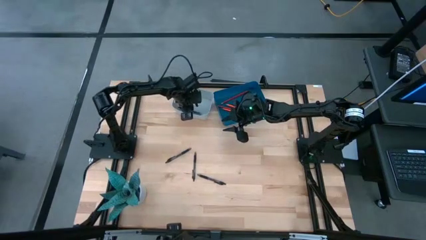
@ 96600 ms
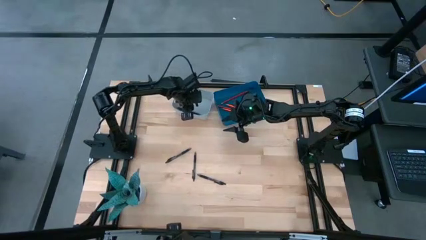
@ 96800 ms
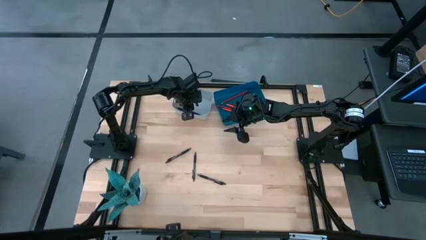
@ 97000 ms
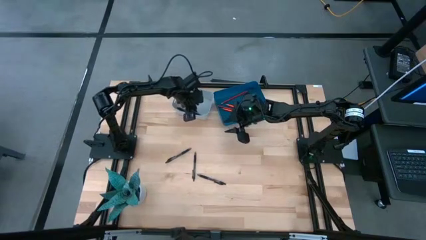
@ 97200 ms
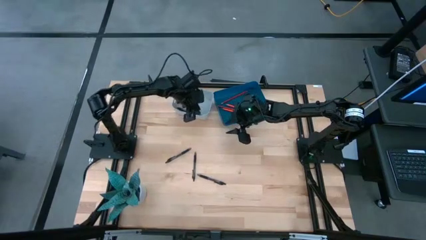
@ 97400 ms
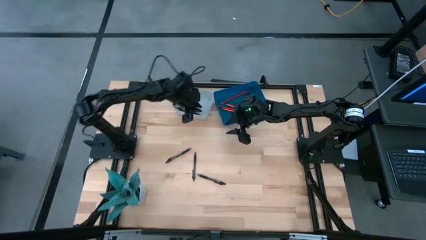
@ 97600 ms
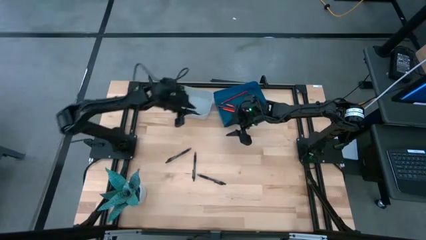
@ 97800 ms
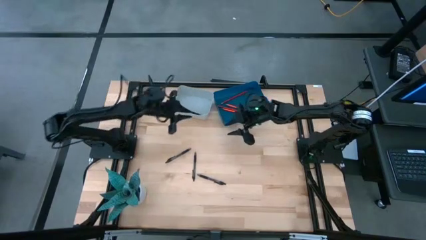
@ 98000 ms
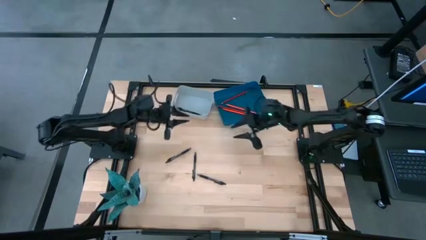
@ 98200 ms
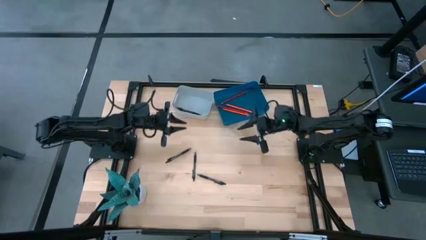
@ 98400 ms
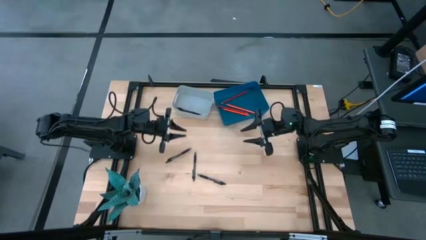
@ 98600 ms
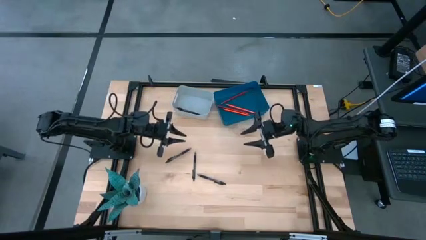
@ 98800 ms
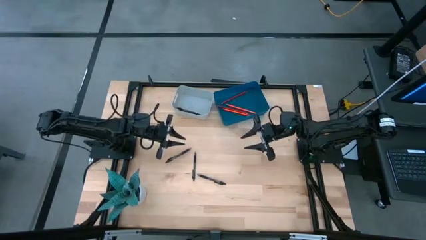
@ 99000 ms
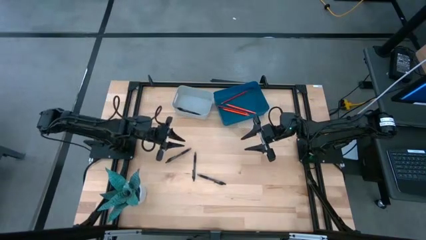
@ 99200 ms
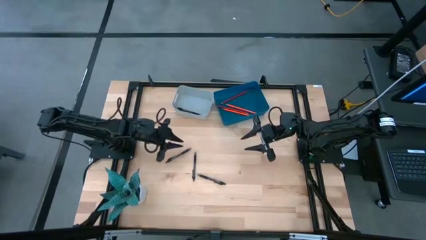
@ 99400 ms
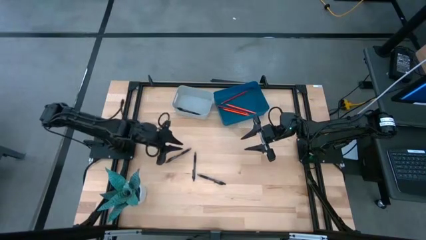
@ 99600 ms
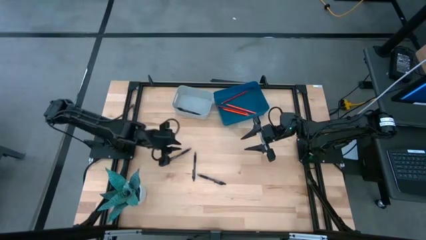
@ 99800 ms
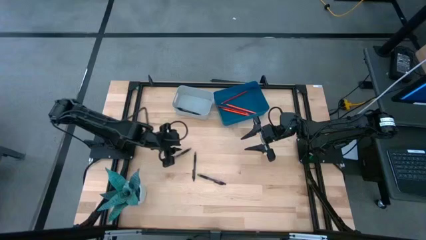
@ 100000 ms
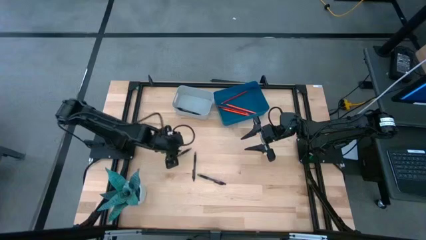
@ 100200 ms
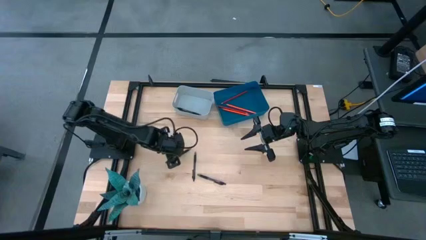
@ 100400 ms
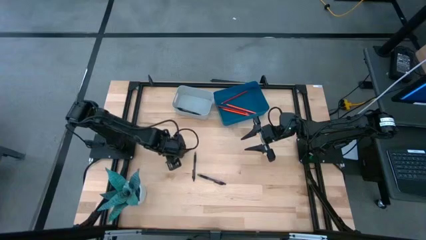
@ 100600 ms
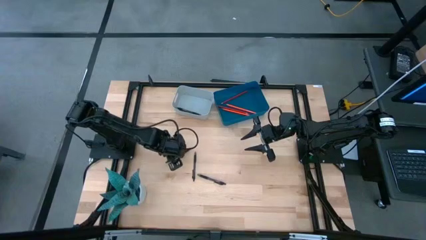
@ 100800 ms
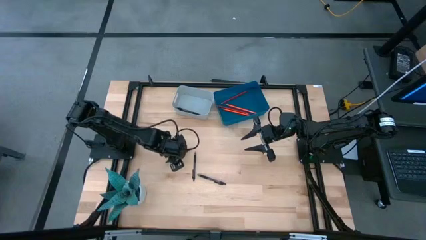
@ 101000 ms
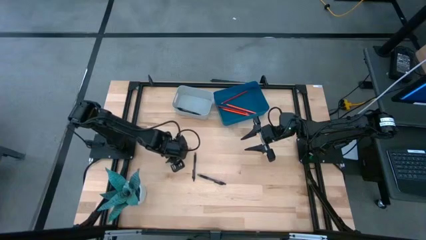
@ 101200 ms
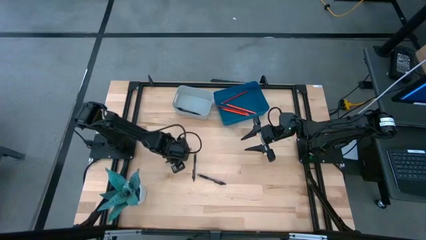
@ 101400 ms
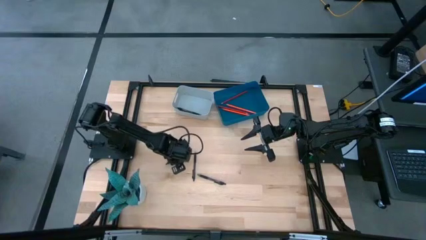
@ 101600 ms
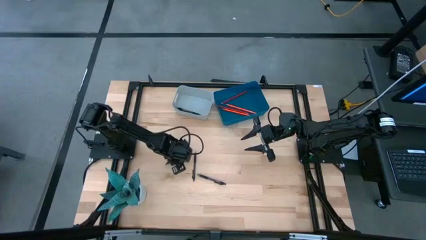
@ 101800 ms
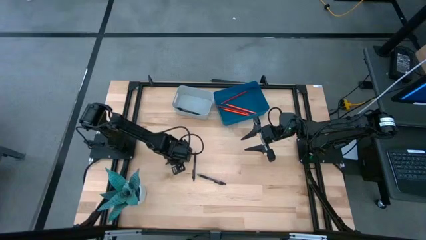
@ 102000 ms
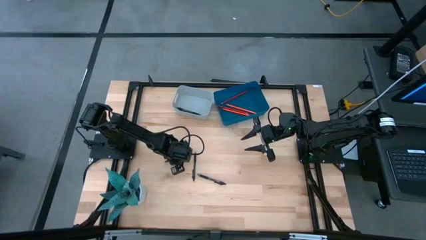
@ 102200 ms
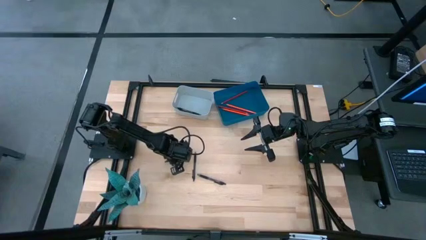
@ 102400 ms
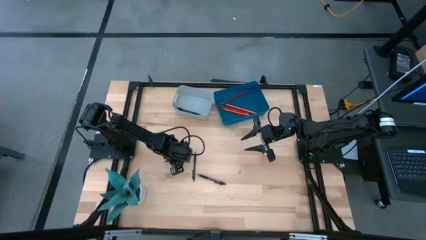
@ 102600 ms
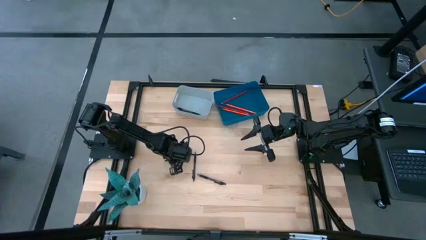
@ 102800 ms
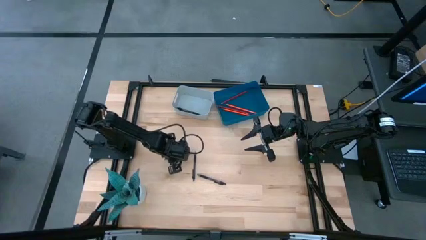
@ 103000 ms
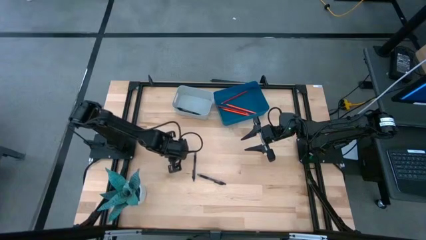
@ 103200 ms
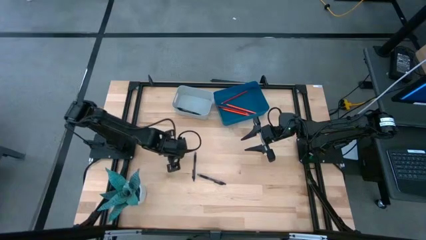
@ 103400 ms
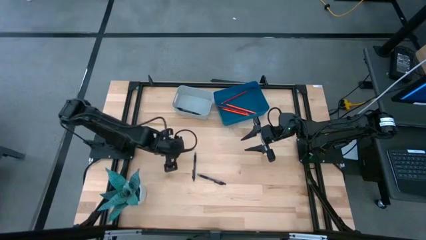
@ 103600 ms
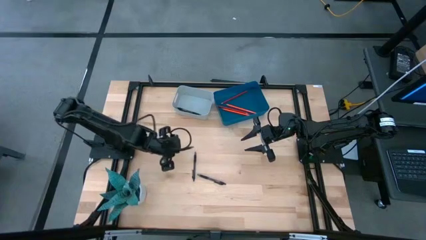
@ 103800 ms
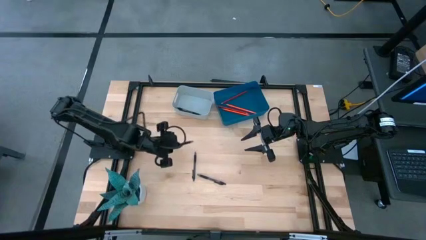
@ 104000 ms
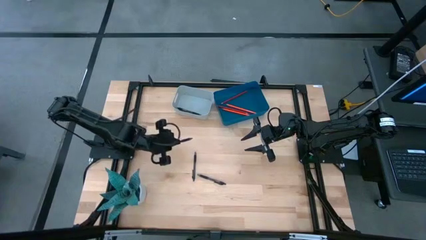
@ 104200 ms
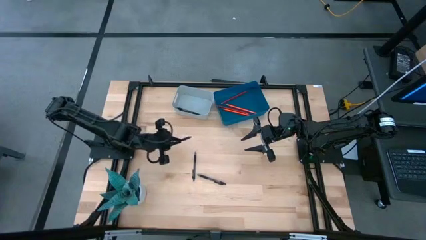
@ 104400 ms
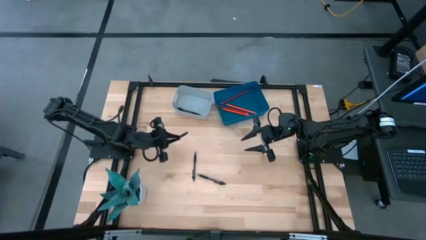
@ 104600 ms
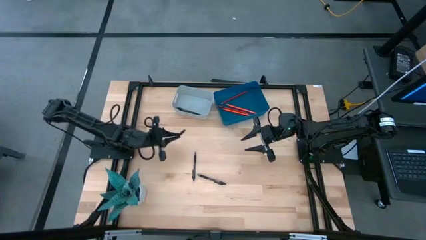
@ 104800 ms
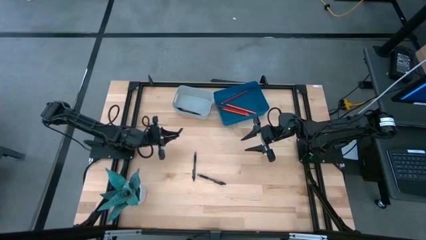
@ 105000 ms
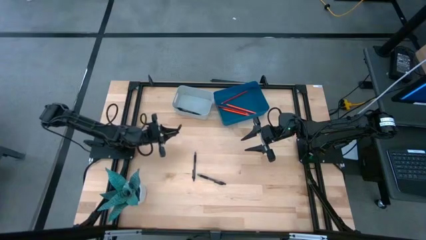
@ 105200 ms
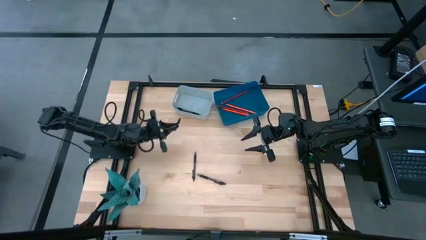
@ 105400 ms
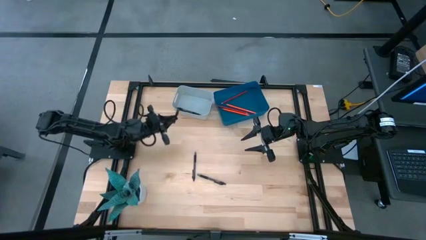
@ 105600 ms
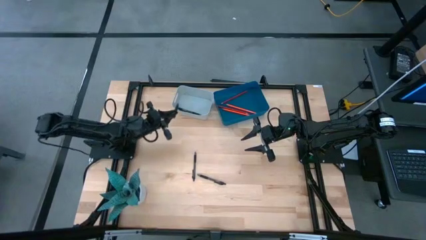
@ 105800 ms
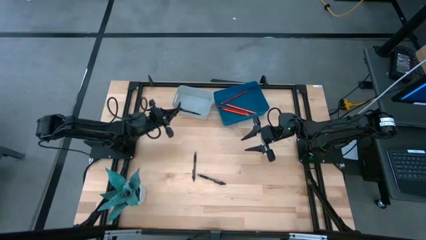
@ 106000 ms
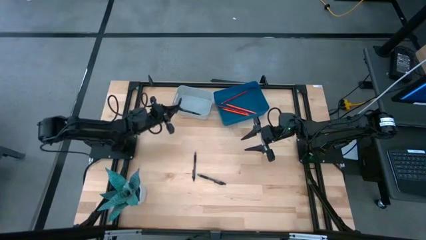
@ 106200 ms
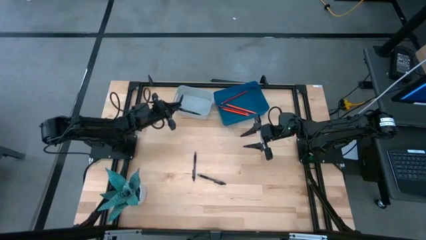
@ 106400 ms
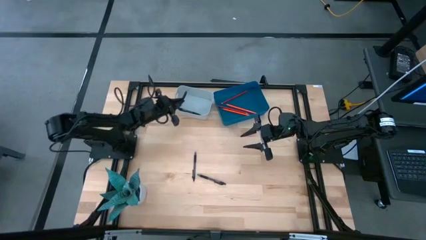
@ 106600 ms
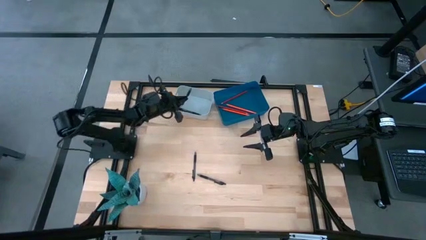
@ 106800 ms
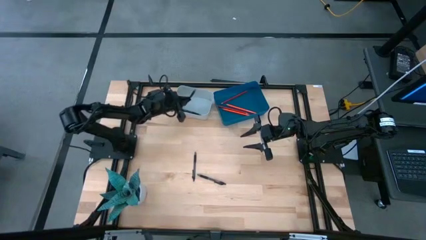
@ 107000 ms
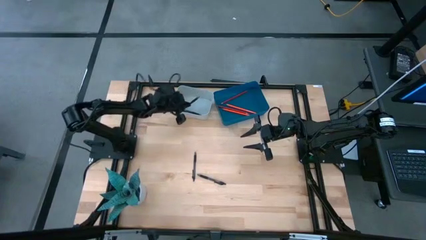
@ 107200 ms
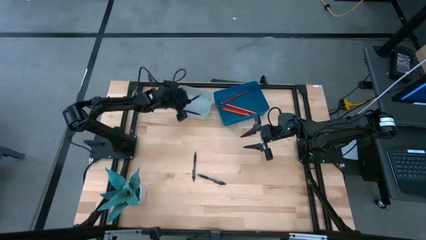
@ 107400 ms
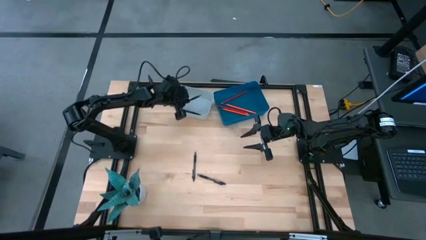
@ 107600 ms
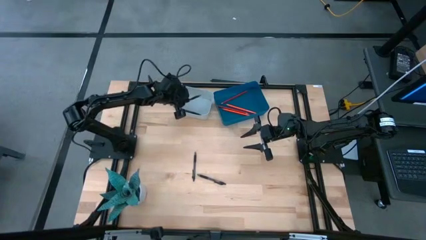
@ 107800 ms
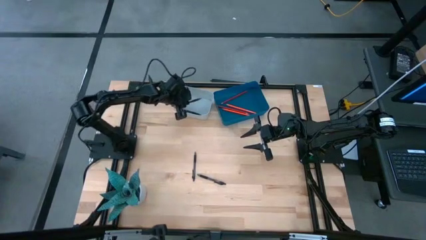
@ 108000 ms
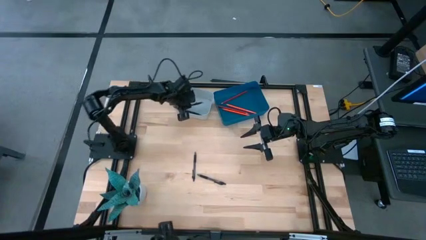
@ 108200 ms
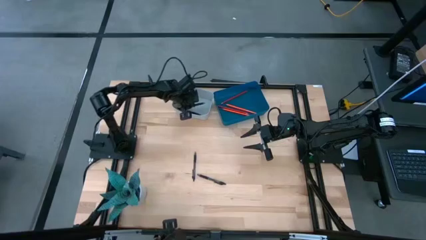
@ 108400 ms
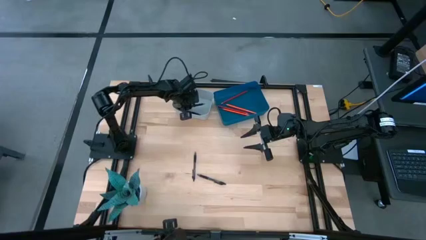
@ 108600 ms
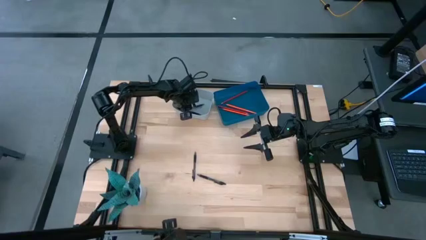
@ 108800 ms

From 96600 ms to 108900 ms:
Task: Sort pens & pencils
Put the black pen into the gray bin

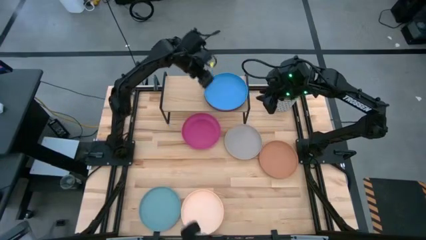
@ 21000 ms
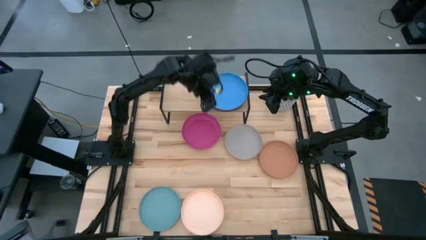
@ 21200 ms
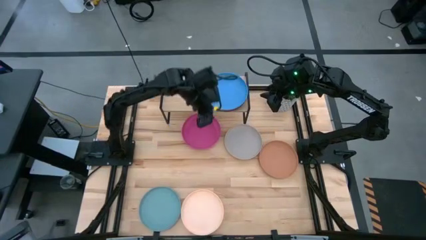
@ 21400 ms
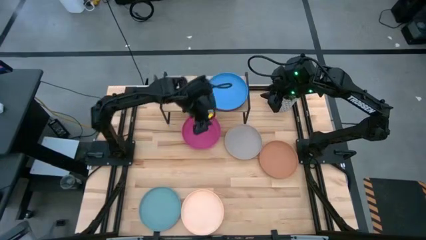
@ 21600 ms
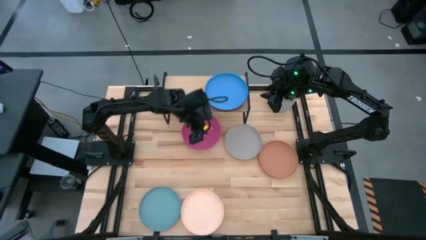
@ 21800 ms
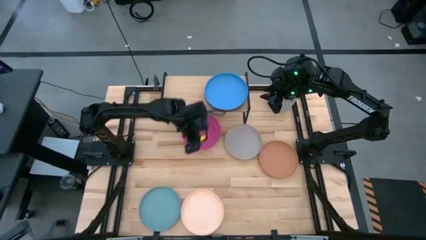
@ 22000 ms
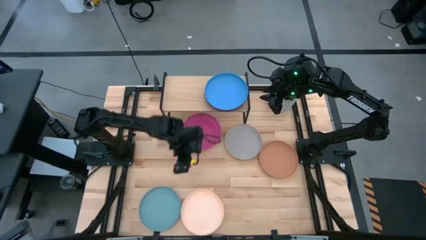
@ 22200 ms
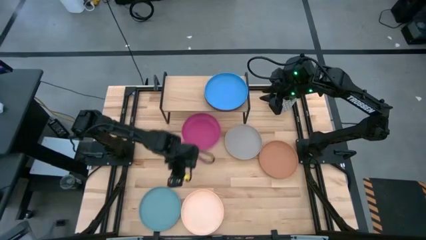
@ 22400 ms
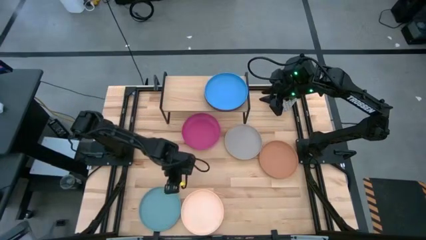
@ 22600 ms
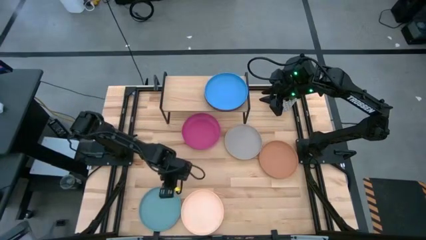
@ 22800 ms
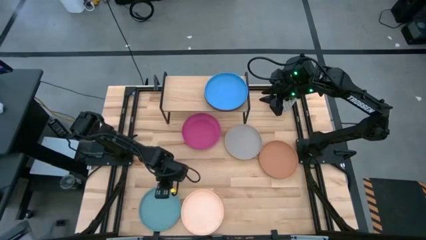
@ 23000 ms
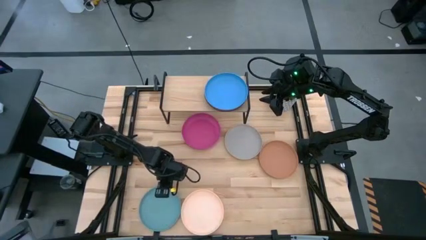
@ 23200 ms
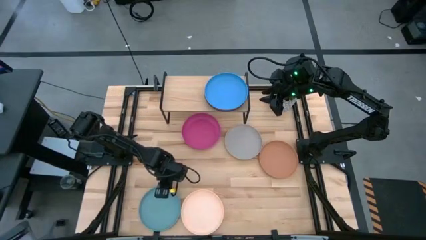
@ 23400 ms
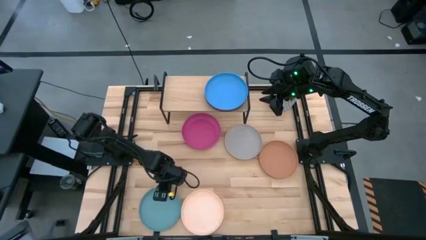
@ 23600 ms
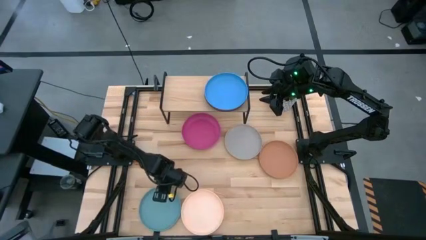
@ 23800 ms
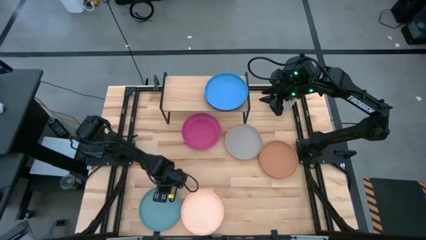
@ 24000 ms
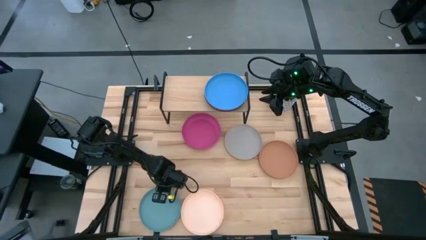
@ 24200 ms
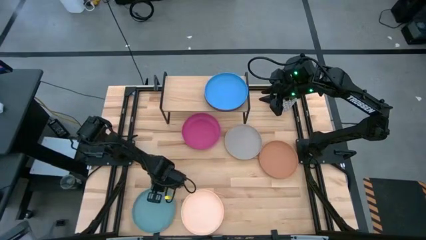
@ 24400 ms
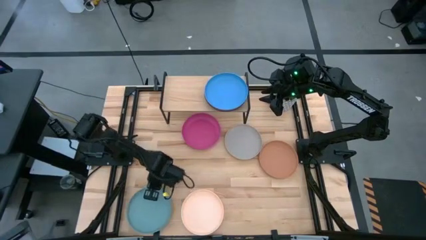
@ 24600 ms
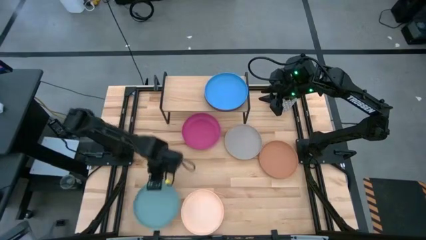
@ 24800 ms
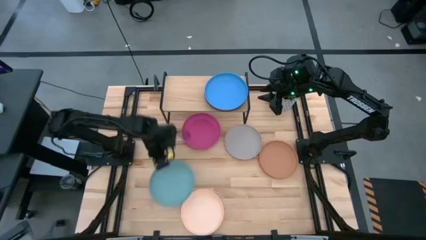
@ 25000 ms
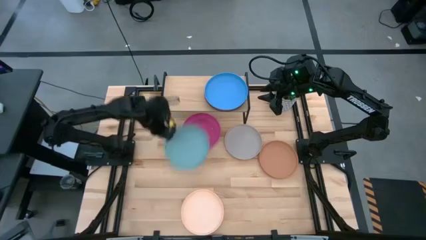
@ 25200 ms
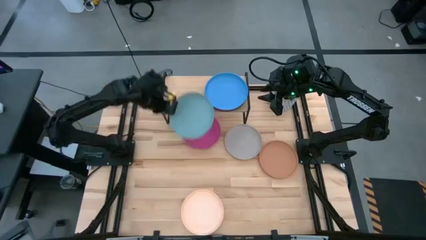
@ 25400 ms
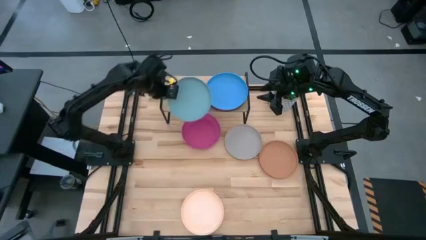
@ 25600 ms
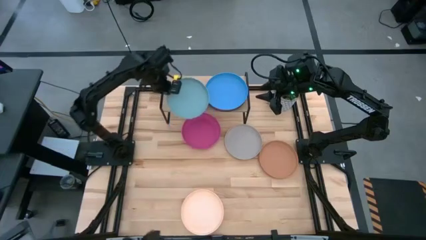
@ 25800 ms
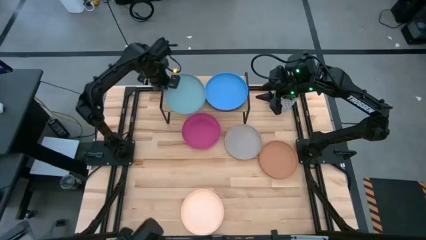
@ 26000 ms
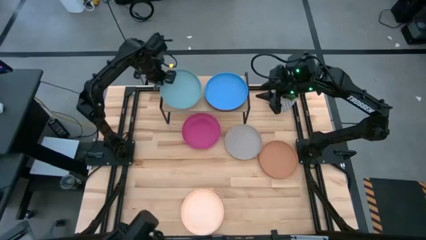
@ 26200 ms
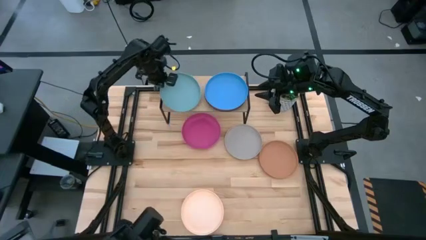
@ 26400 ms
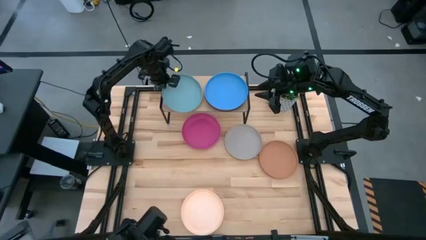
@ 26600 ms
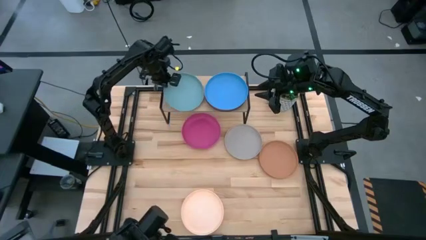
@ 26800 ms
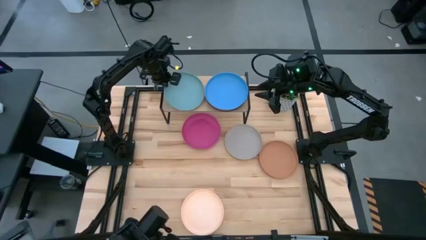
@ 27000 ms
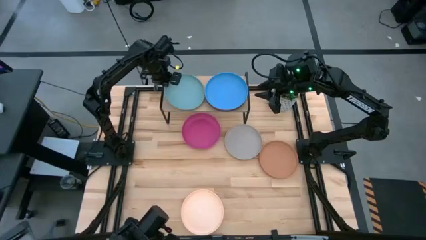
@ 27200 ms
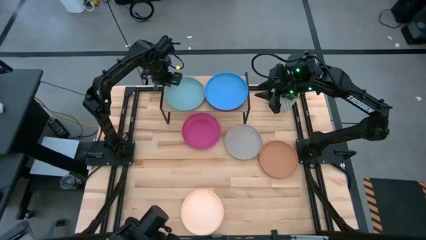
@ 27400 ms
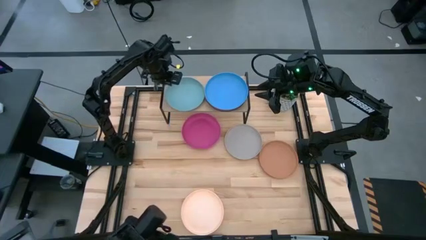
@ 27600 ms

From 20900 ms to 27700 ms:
Task: Place and stack plates onto a shelf
Put the light green plate on the shelf
